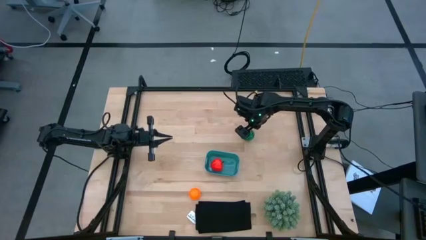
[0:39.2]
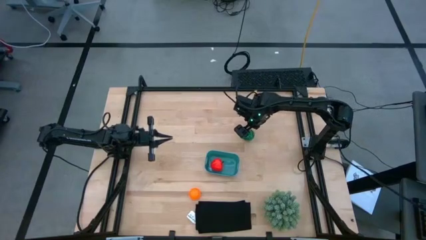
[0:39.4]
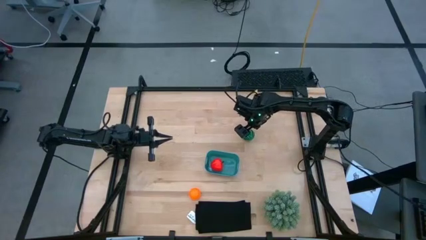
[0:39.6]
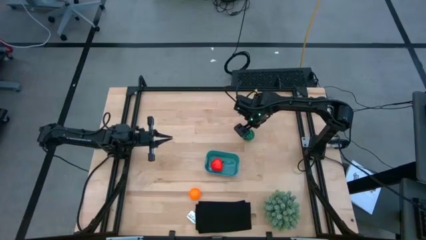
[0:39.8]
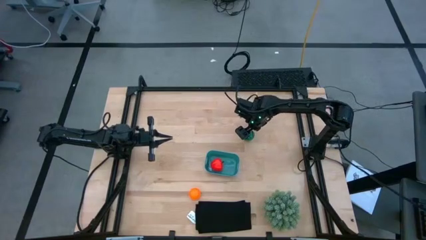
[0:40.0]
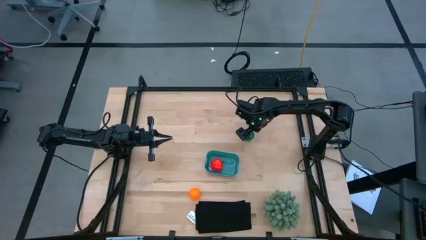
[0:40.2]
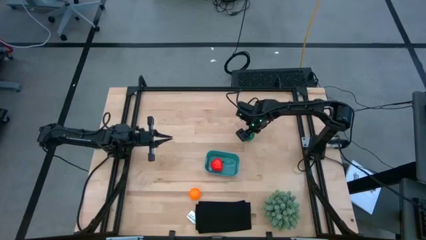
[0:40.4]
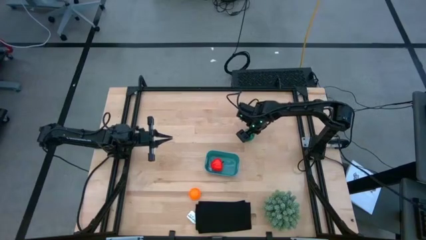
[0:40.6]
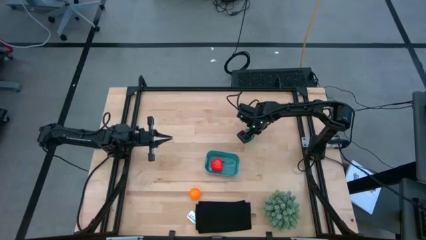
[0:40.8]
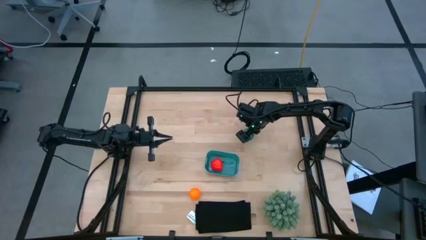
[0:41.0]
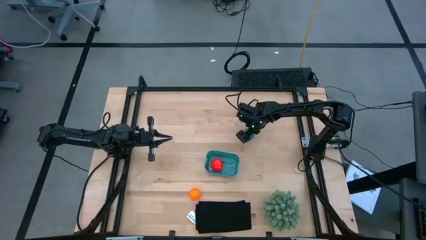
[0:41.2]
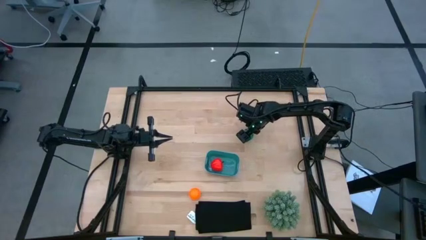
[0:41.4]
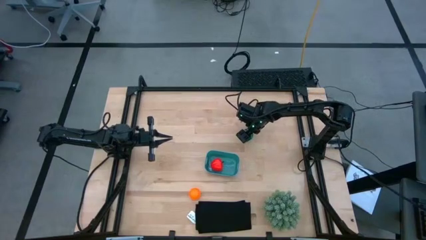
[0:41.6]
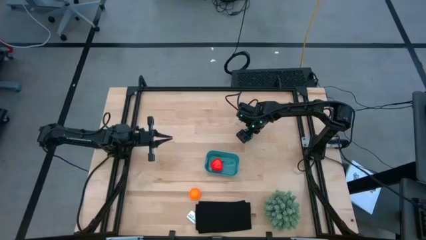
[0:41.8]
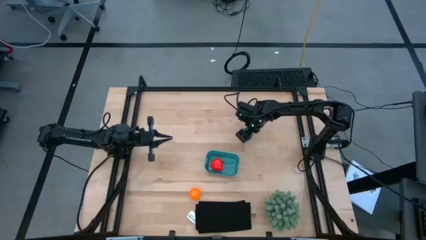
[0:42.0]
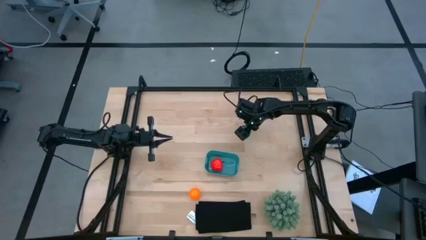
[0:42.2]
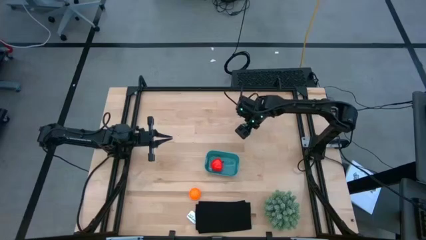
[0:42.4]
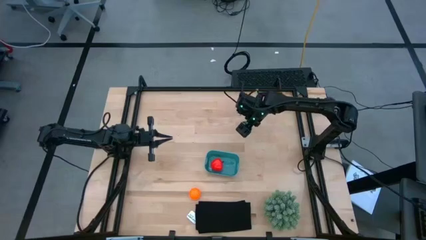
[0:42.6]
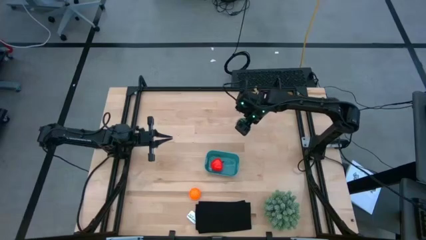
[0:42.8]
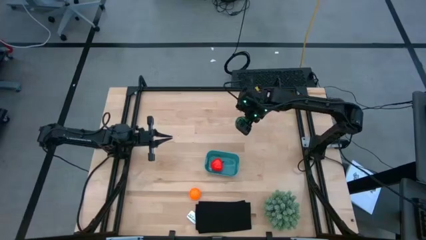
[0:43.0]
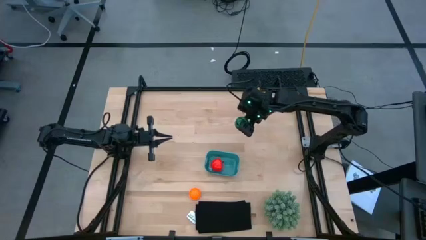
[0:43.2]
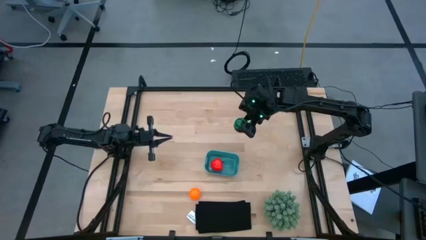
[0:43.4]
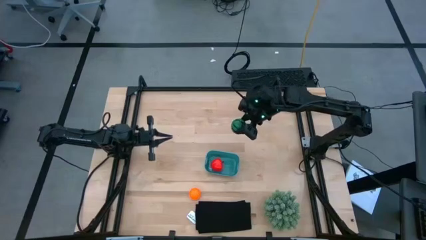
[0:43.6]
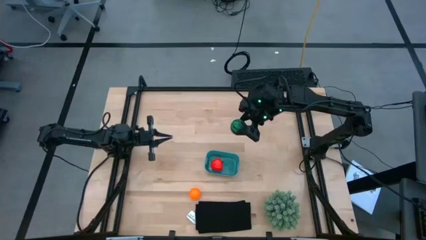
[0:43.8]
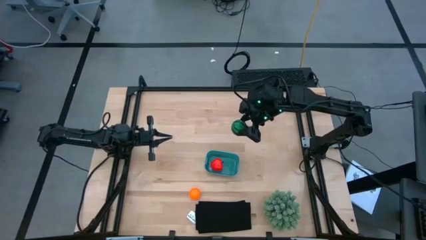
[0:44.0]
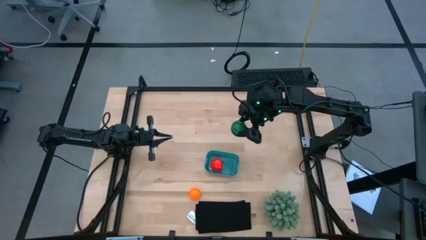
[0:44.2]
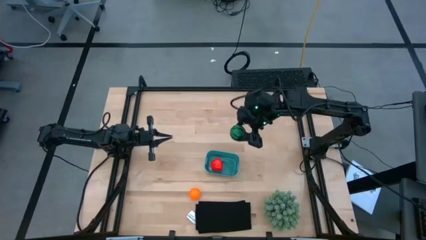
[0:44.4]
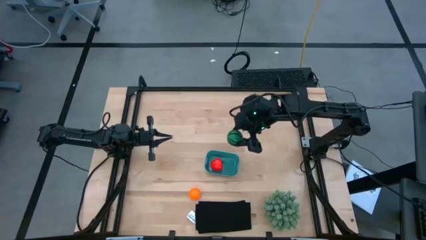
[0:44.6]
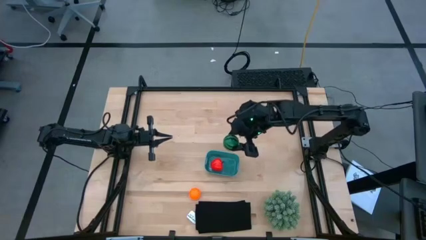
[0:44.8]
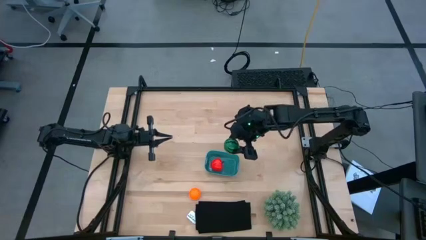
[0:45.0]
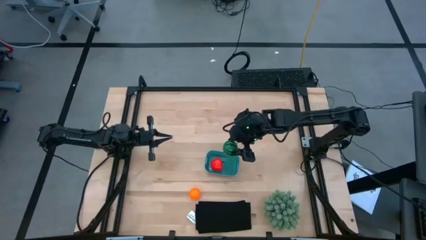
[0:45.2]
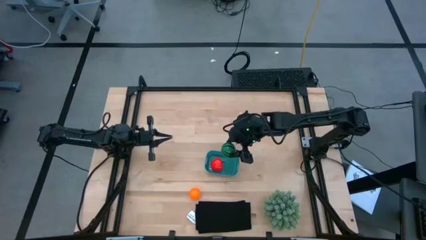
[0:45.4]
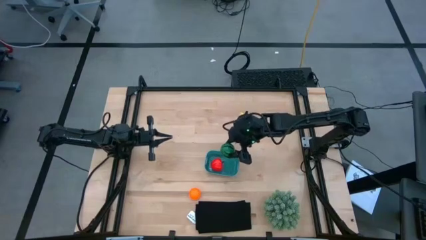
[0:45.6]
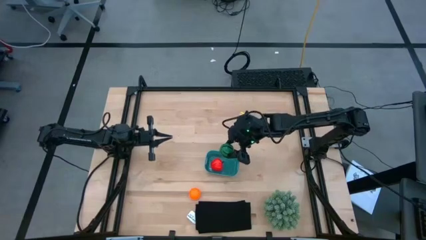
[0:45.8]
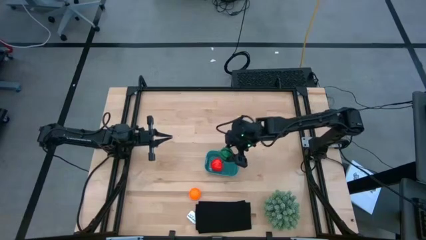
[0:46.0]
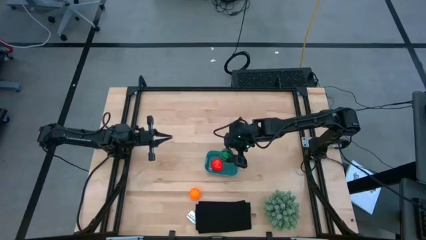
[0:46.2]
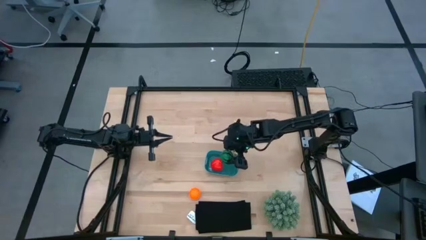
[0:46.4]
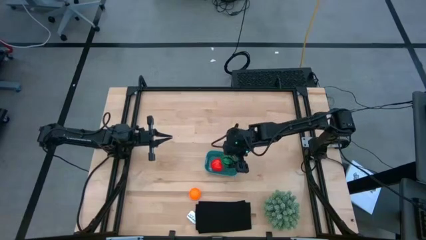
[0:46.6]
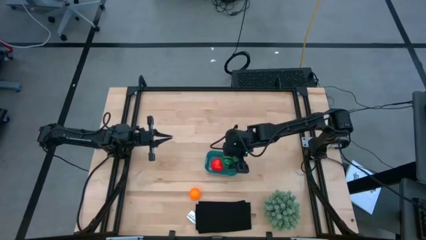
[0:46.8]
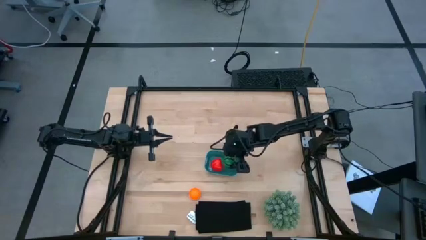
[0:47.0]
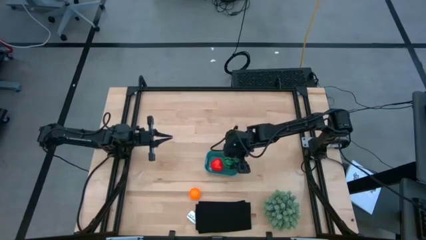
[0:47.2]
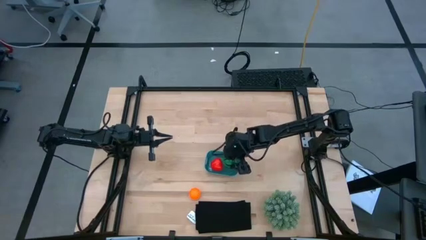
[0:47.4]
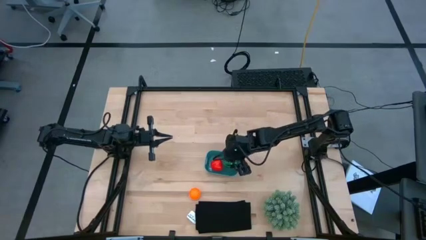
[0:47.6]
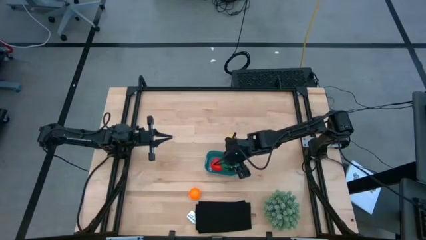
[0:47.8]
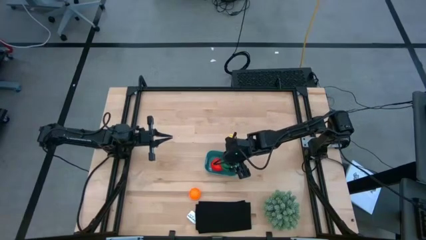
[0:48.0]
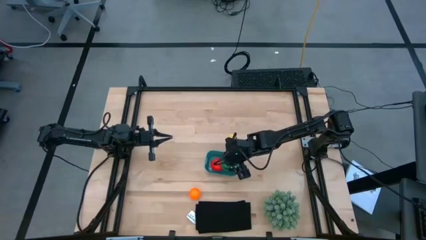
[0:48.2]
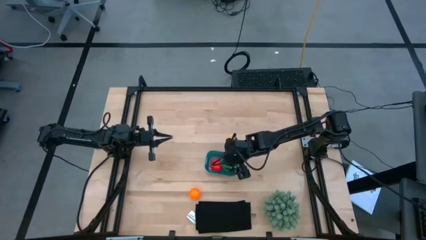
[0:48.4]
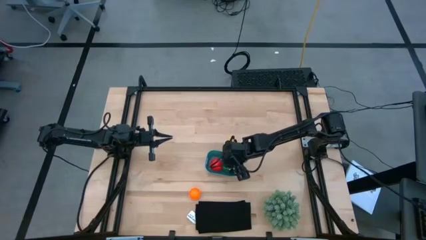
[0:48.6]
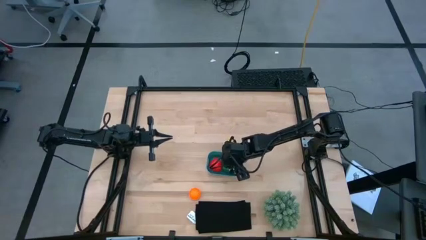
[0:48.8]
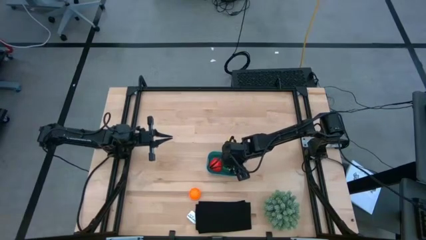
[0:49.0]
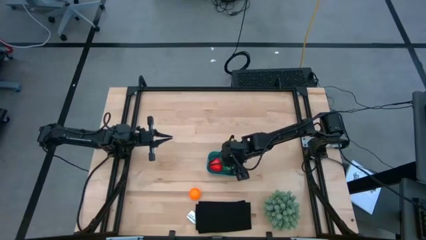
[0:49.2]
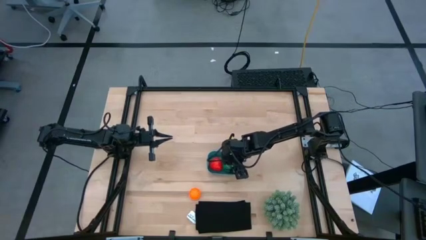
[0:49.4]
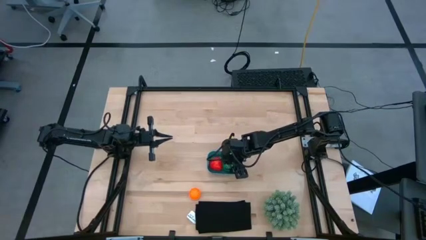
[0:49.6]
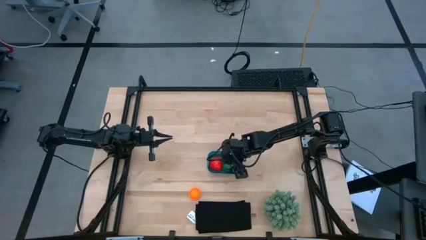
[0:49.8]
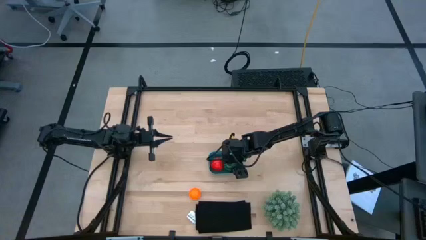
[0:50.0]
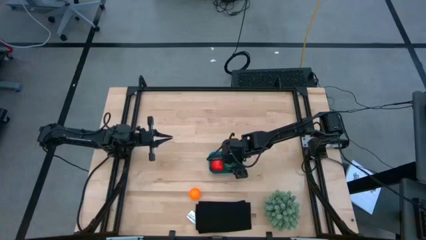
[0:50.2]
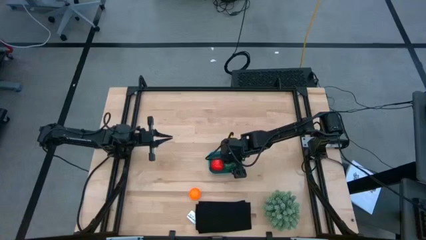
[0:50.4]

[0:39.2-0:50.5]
Task: Pick and placing Produce into tupperware
Put the green watermelon into the blue container

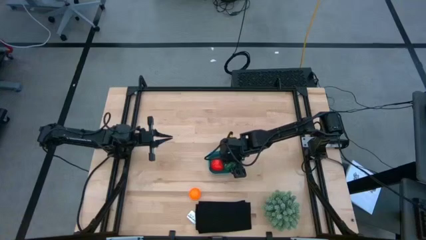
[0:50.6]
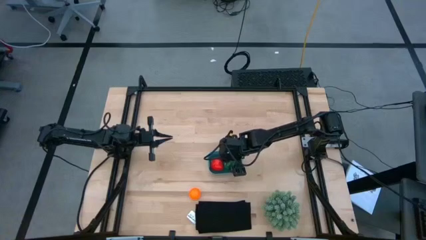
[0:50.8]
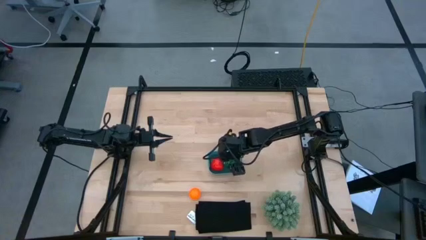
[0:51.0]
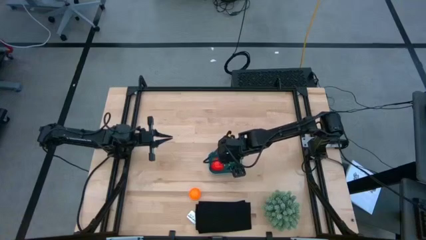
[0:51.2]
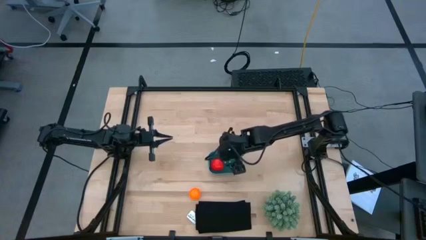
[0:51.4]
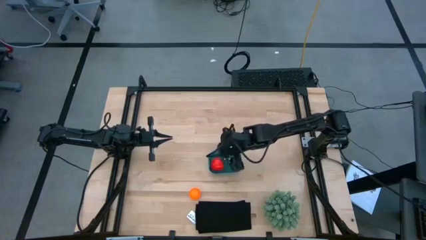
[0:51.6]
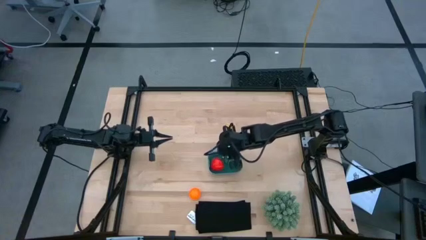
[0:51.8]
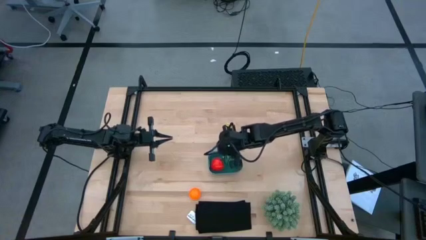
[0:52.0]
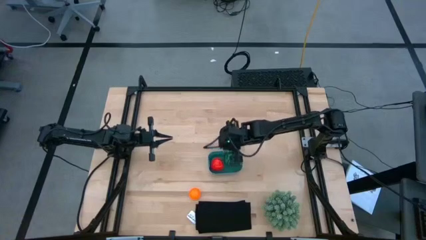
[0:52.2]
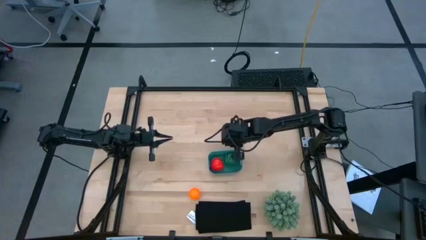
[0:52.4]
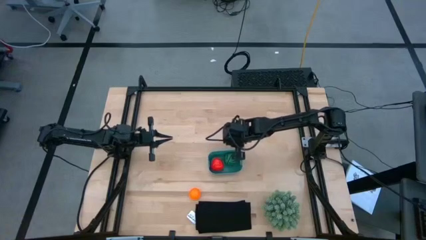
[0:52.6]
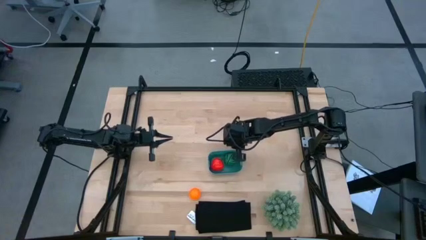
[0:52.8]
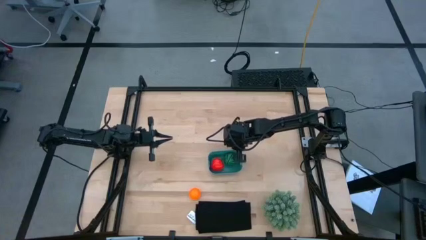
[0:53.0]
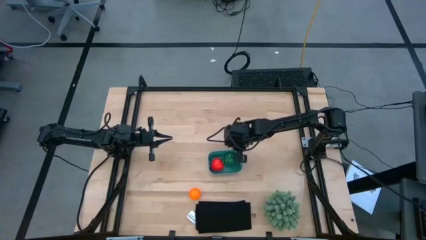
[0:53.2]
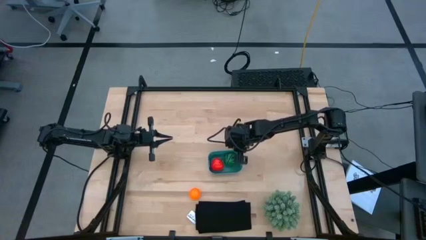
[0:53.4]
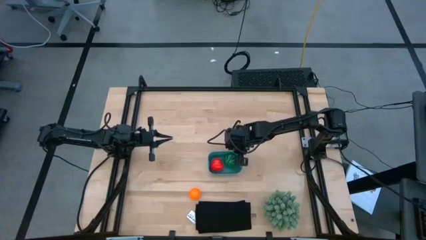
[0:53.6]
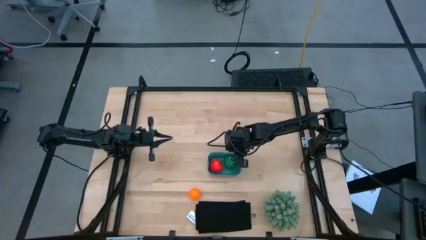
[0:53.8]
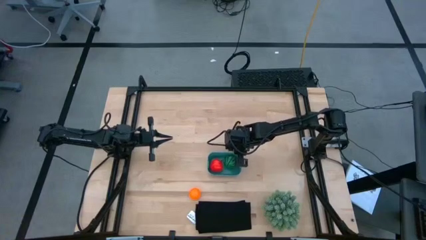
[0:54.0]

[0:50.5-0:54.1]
Adjust the blue container
